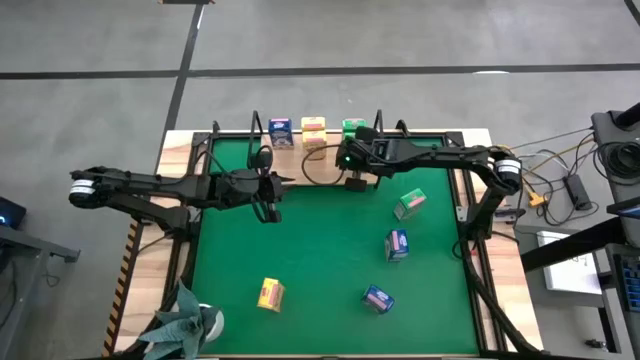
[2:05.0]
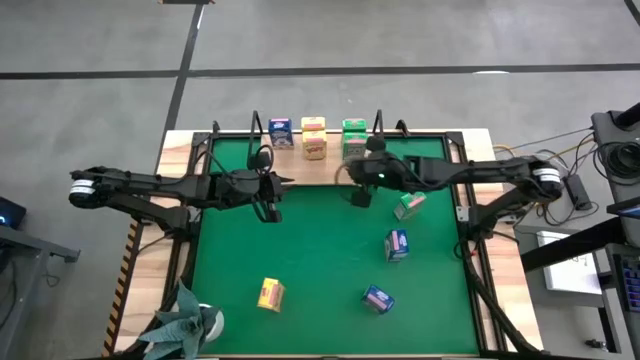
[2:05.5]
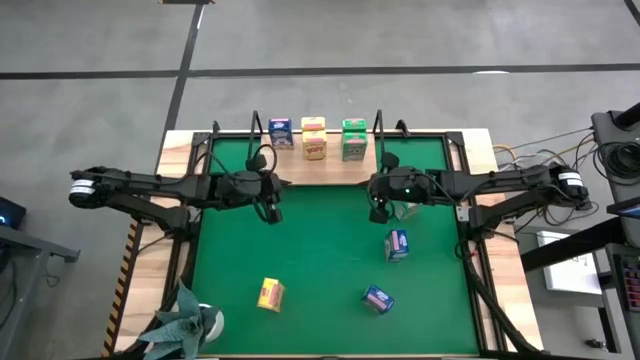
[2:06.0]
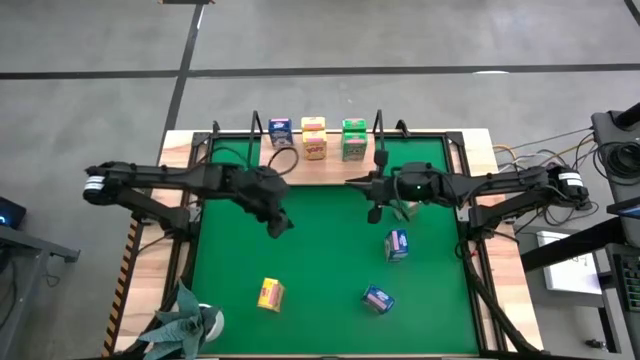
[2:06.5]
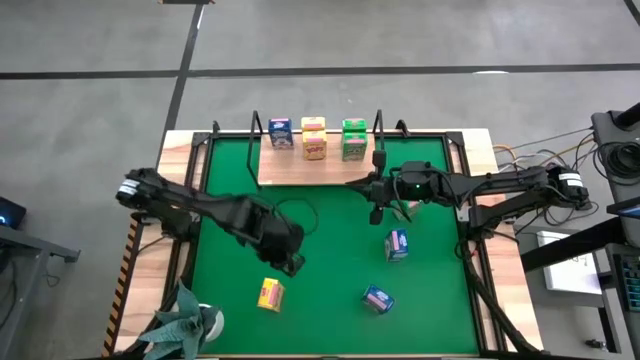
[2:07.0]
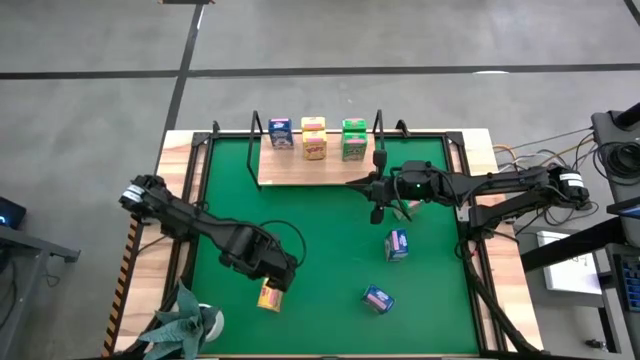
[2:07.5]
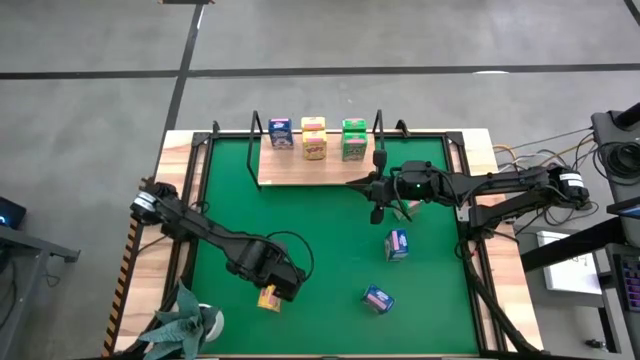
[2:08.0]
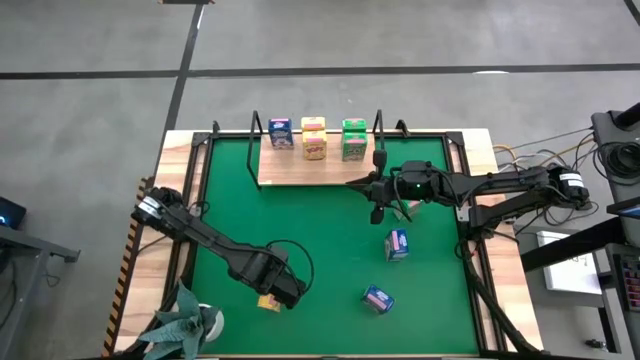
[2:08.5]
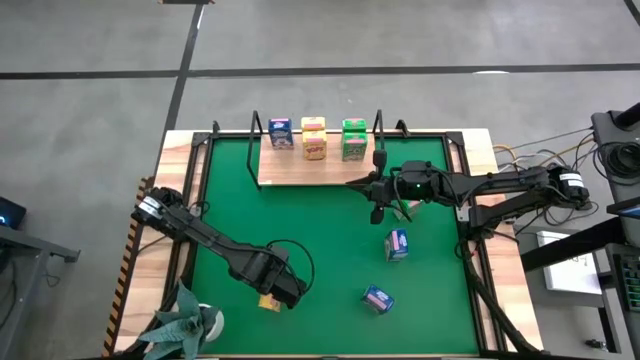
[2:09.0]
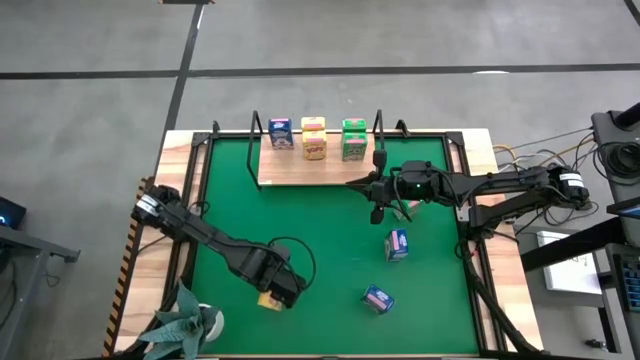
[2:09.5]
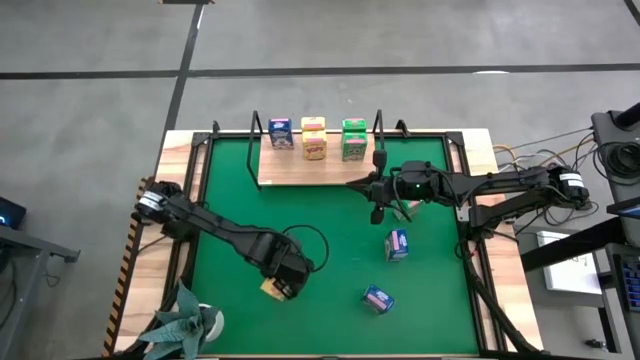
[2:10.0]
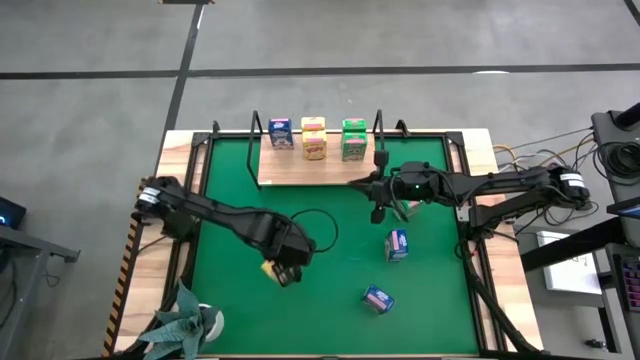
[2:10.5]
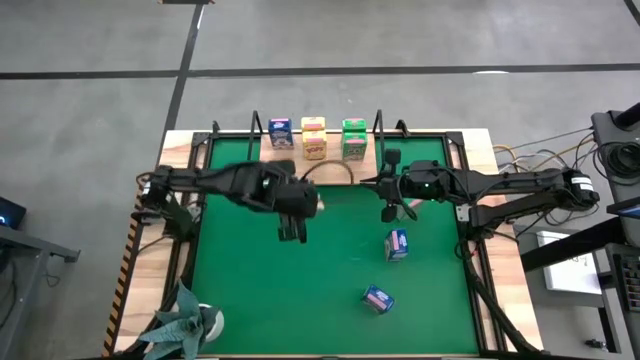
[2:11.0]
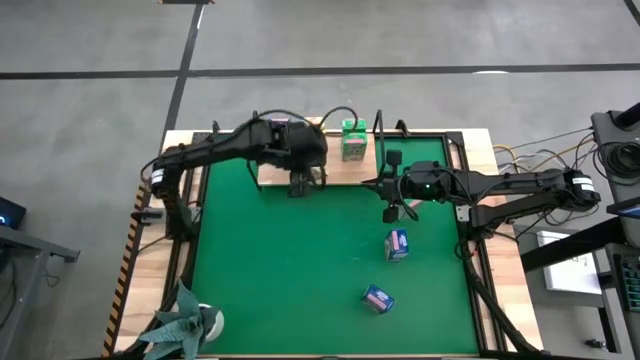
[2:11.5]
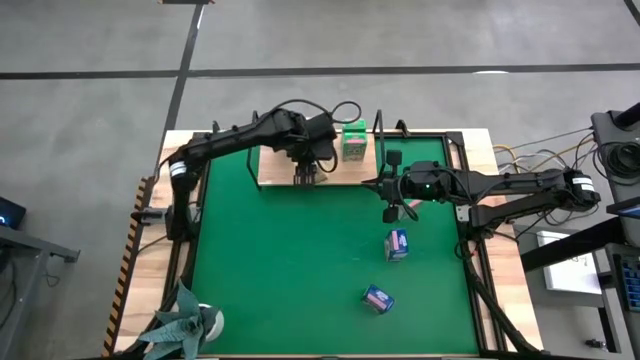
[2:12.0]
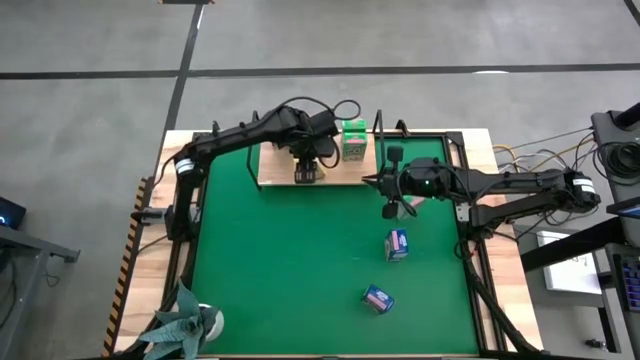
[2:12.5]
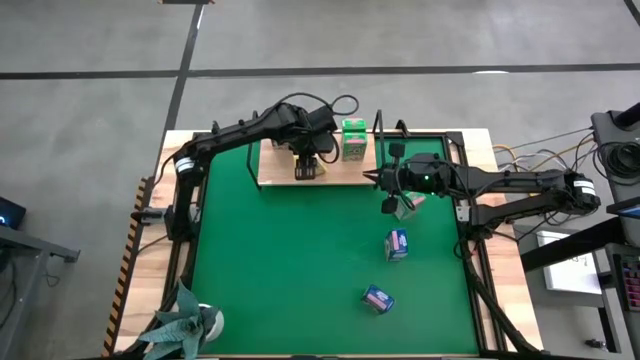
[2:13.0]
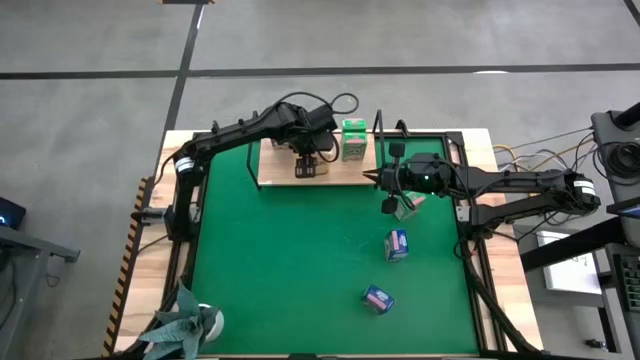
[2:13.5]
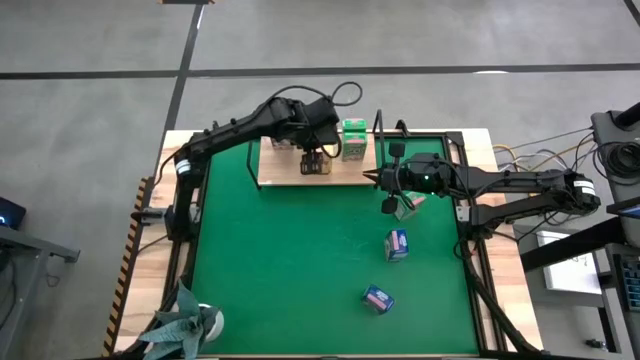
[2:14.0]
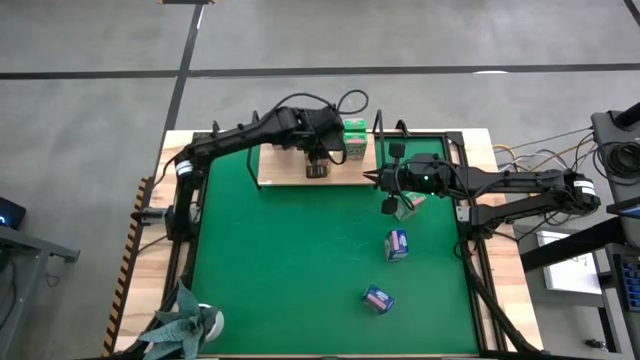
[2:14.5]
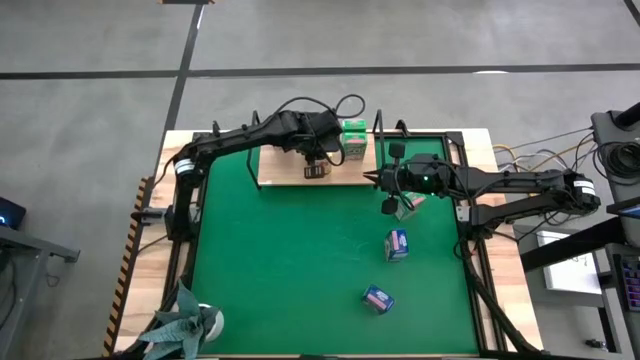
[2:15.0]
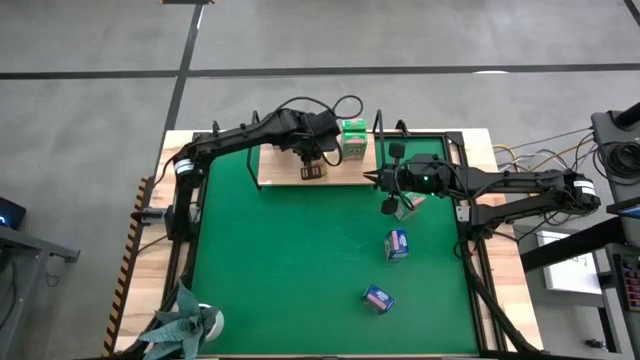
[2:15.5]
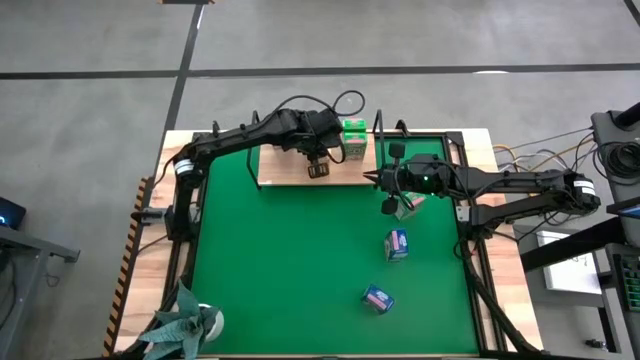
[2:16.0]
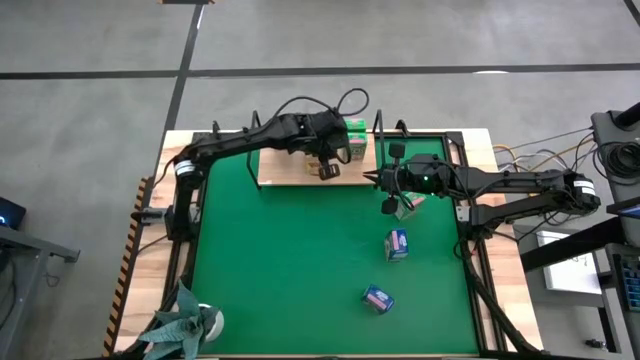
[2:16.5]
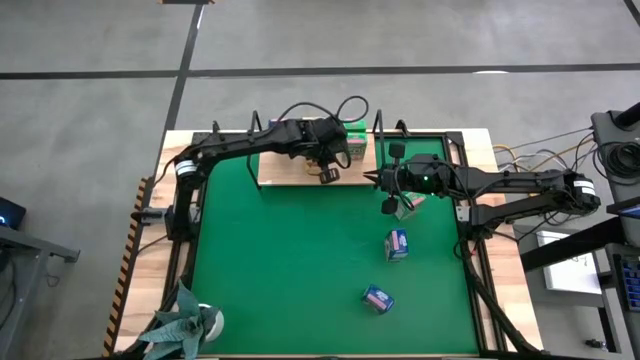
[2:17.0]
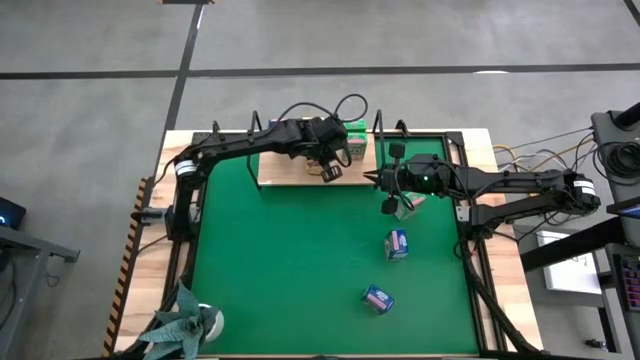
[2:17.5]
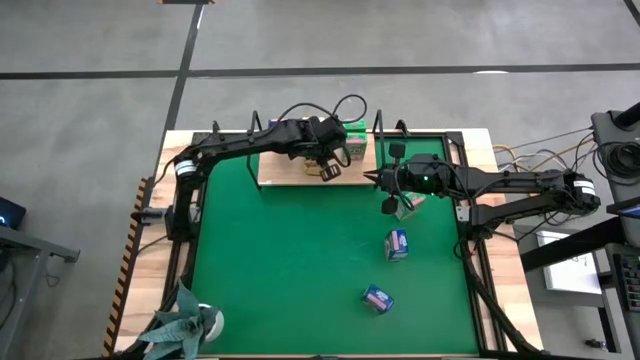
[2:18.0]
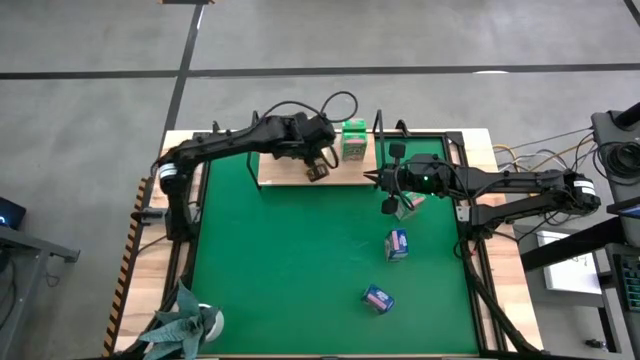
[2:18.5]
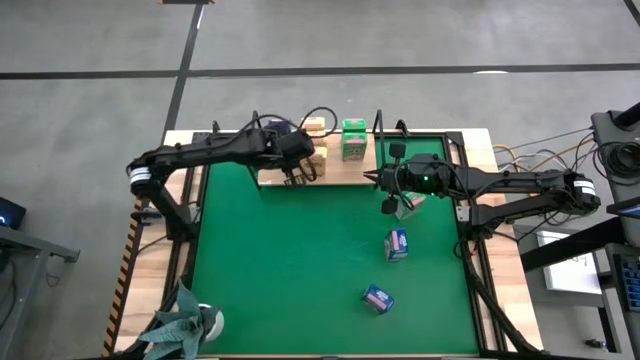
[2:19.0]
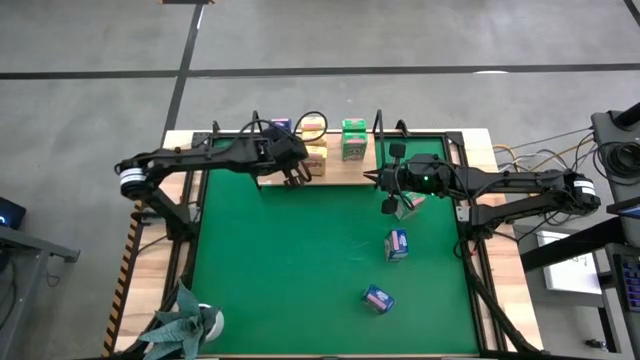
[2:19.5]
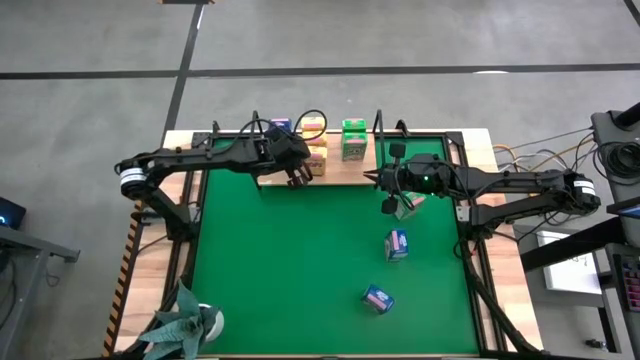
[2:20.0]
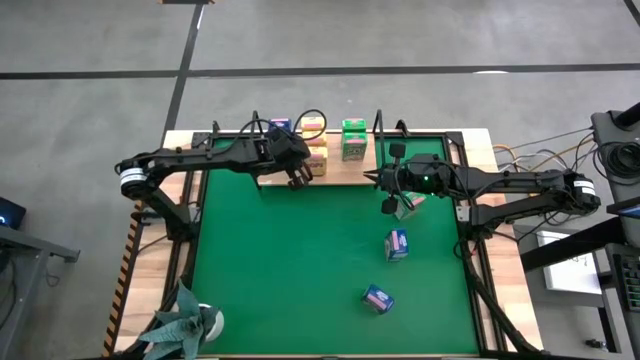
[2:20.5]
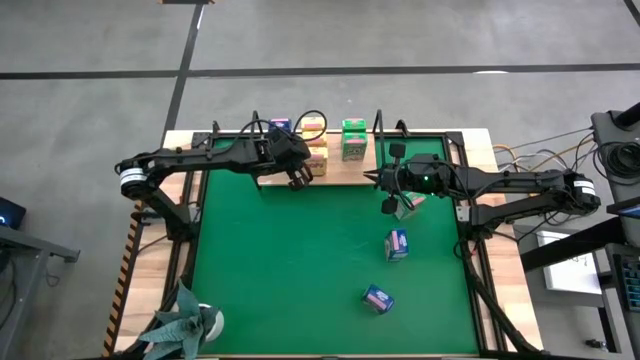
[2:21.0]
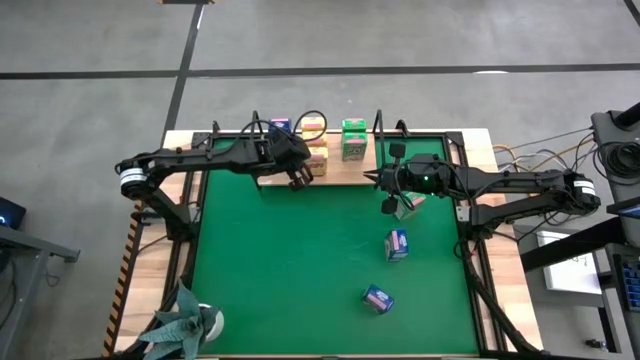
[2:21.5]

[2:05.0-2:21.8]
Task: Stack cereal on shelf
Put the yellow cereal box on the shelf aligned with the other yellow cereal boxes

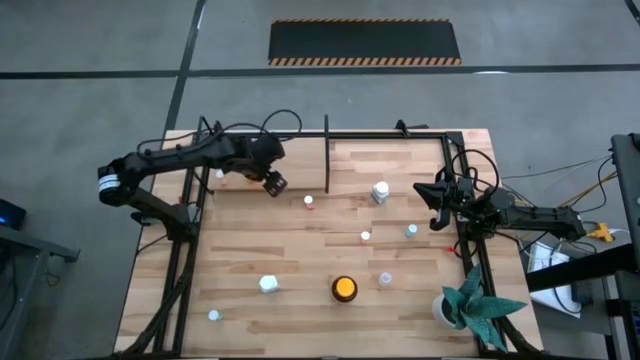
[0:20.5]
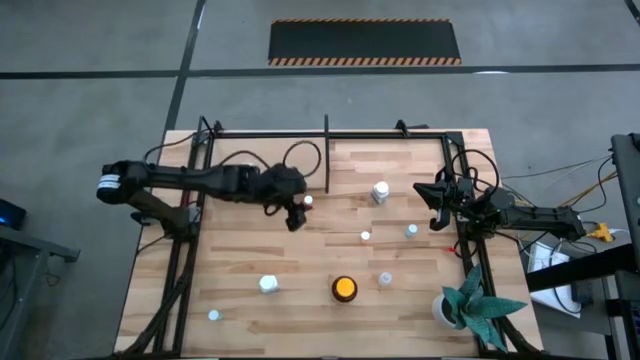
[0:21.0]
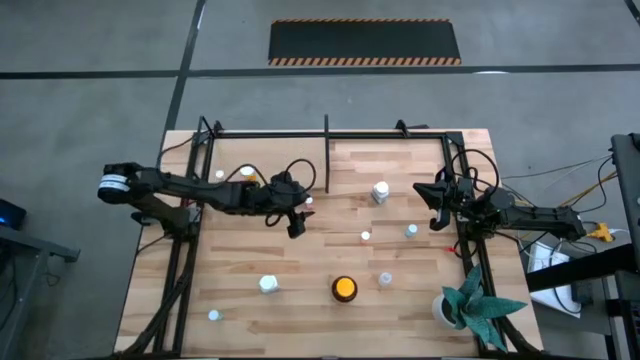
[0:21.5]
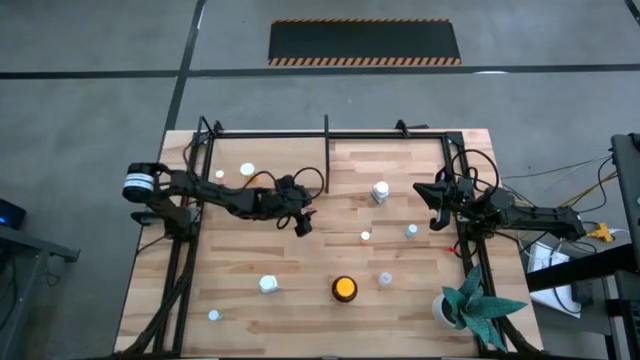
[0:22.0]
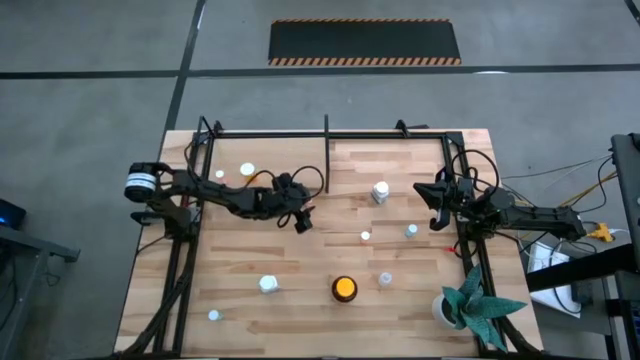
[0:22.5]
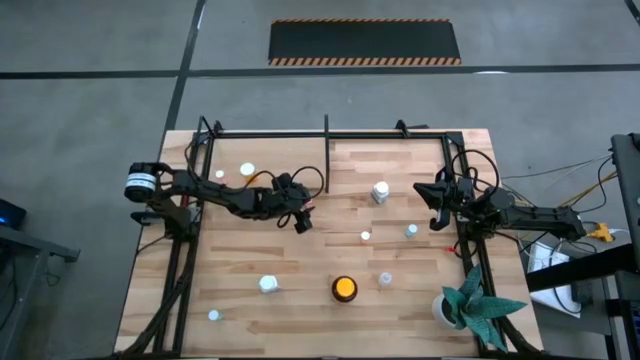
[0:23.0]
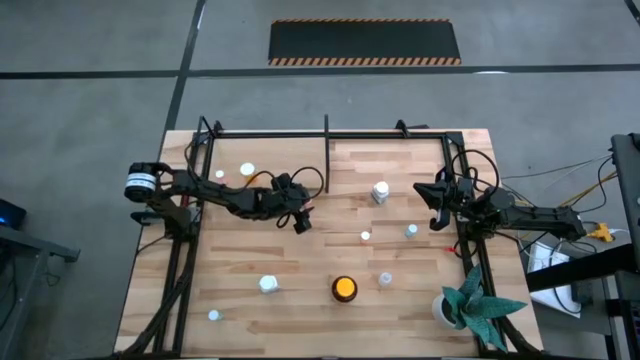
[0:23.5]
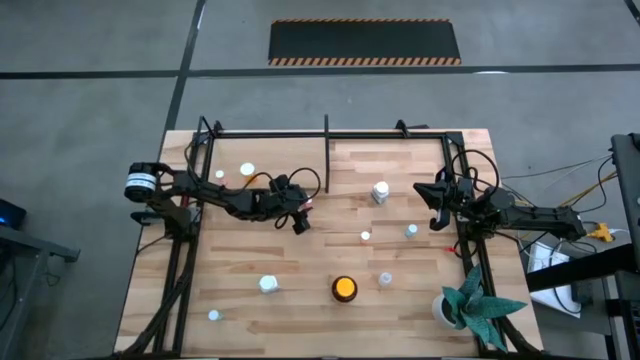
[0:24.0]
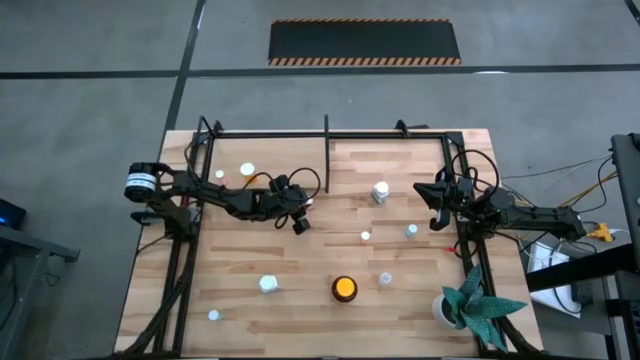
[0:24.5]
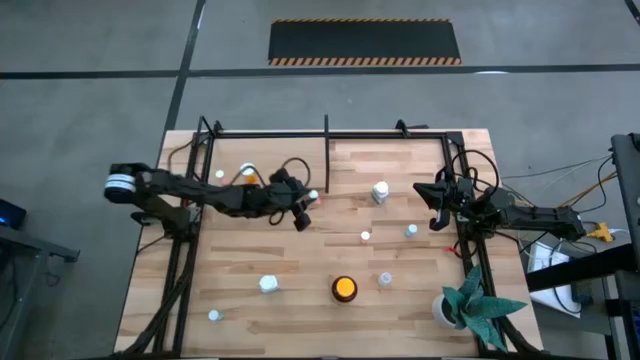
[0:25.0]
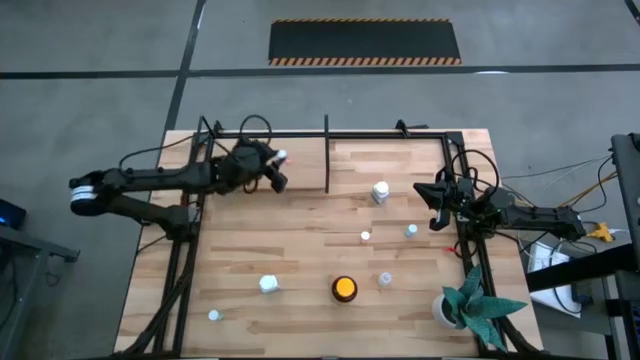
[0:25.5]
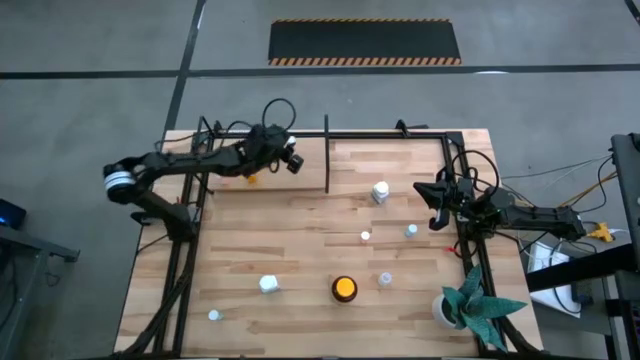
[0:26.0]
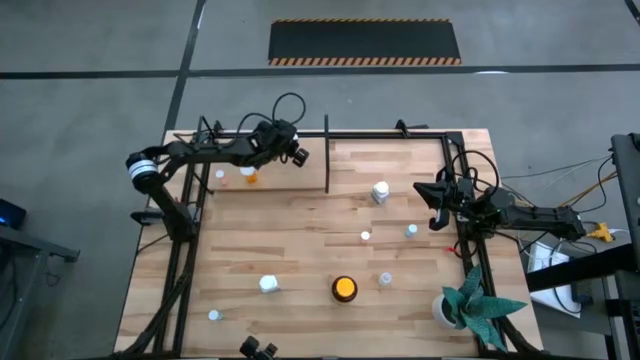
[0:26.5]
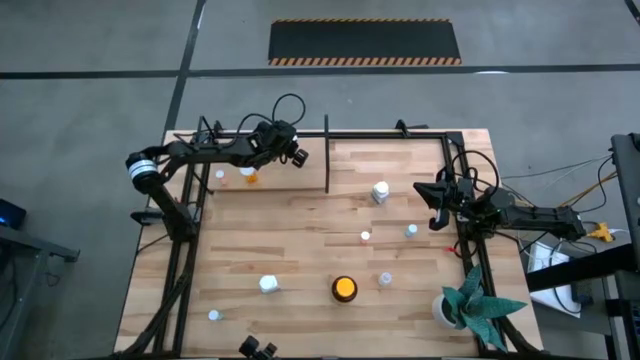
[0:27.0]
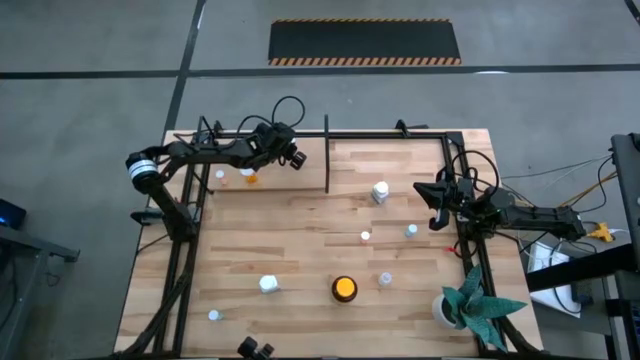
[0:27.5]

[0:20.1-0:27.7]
Task: Pick and place medicine bottles onto shelf by color
Put the top pink pill bottle on the shelf
